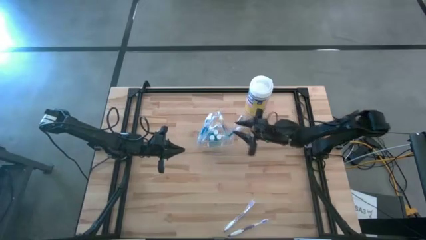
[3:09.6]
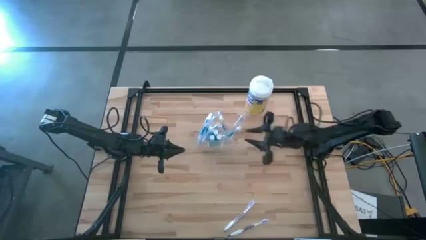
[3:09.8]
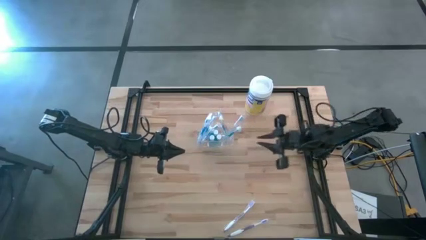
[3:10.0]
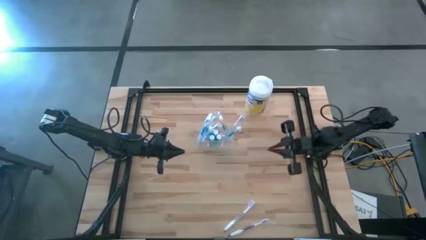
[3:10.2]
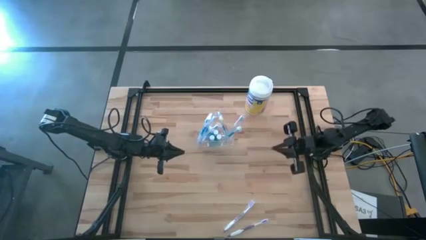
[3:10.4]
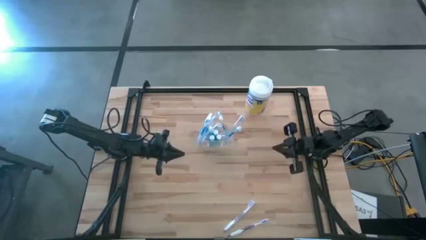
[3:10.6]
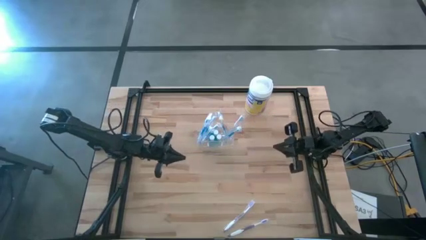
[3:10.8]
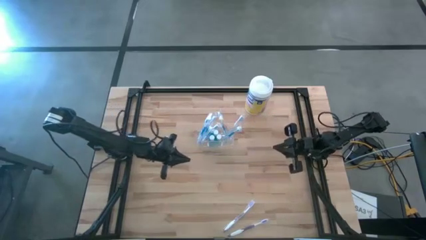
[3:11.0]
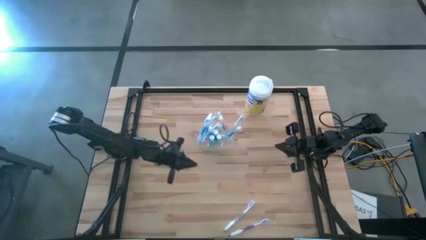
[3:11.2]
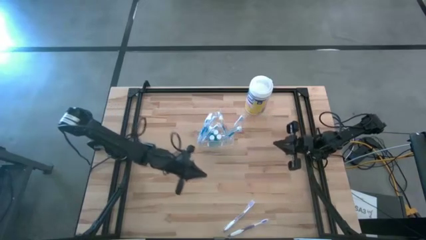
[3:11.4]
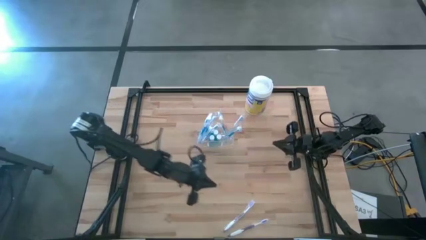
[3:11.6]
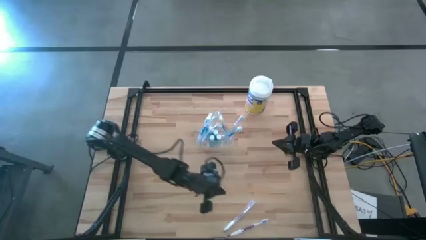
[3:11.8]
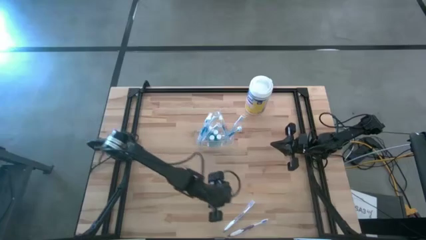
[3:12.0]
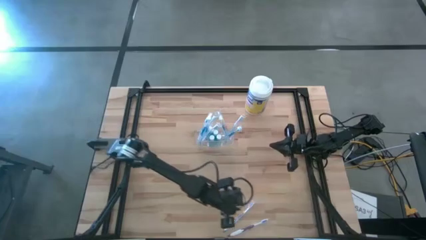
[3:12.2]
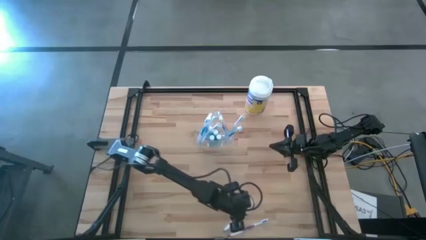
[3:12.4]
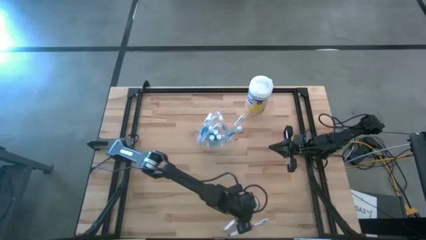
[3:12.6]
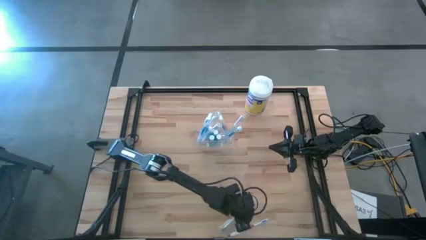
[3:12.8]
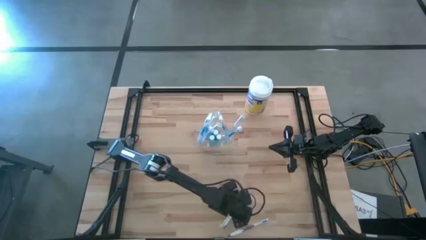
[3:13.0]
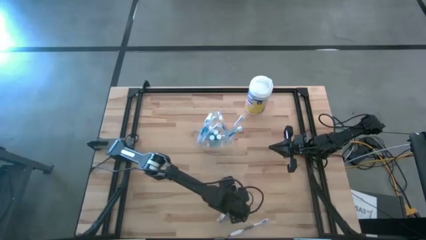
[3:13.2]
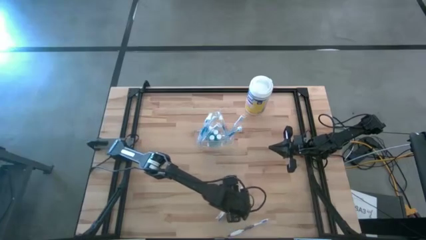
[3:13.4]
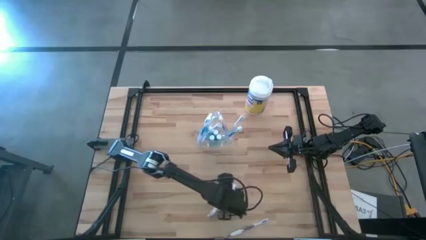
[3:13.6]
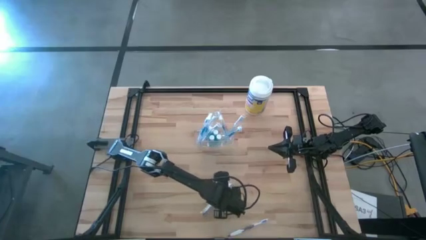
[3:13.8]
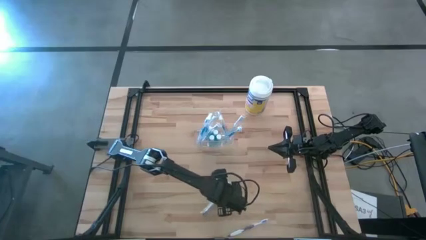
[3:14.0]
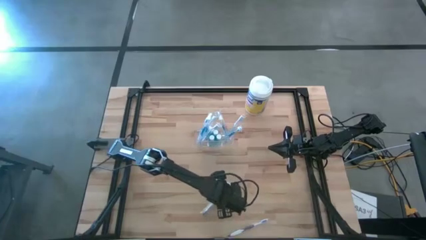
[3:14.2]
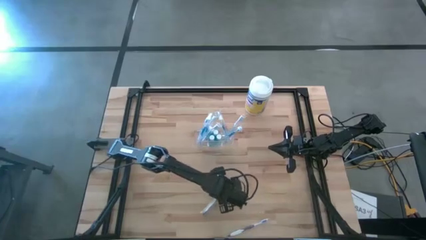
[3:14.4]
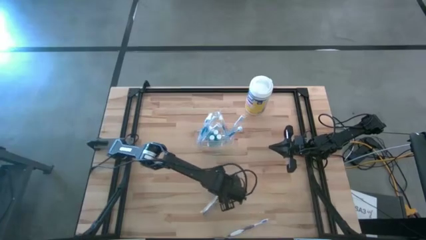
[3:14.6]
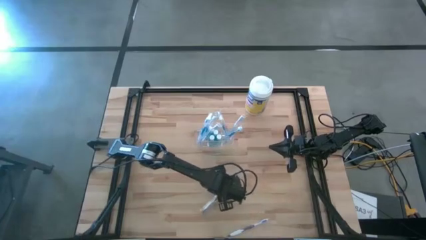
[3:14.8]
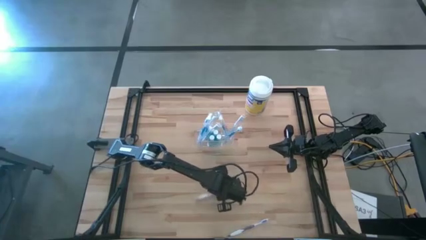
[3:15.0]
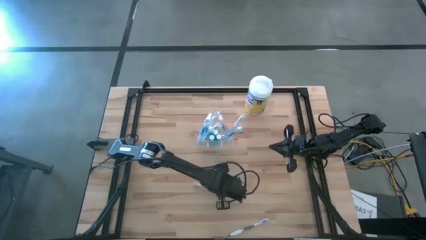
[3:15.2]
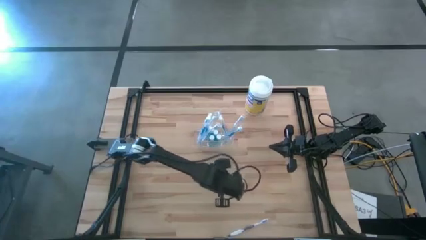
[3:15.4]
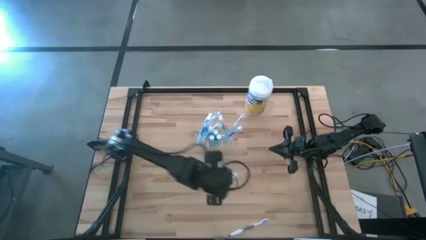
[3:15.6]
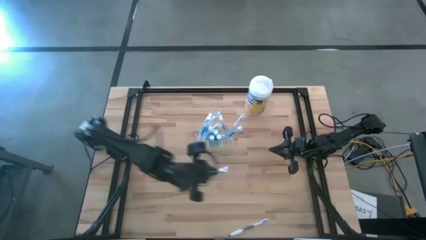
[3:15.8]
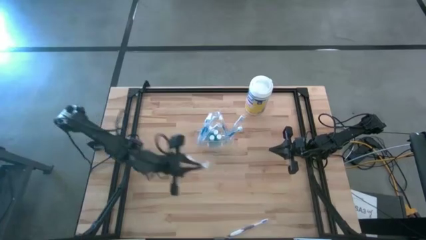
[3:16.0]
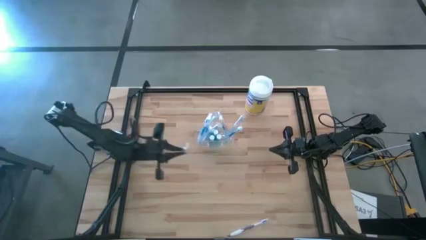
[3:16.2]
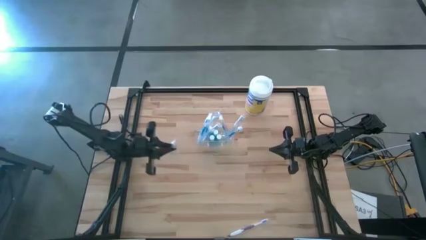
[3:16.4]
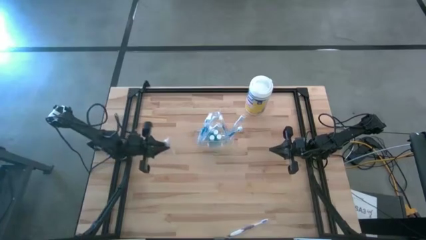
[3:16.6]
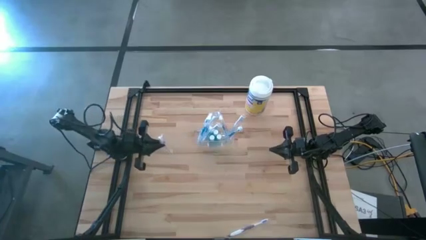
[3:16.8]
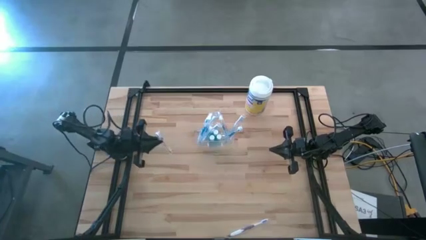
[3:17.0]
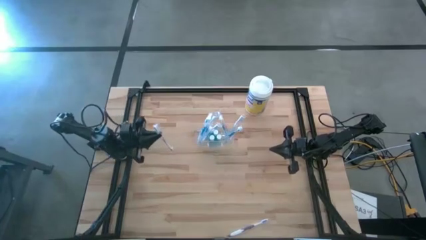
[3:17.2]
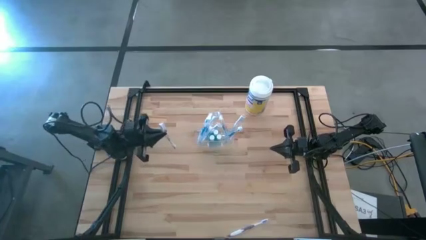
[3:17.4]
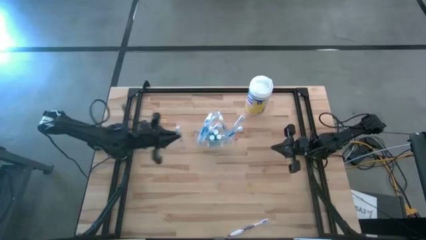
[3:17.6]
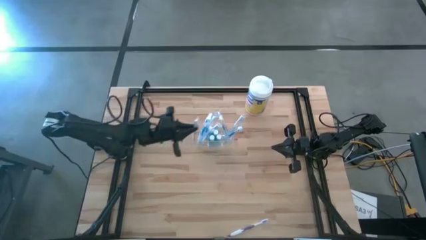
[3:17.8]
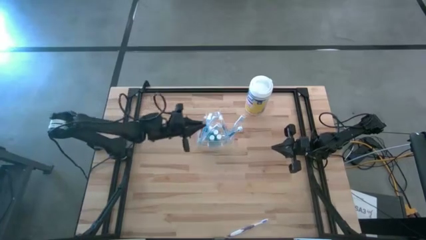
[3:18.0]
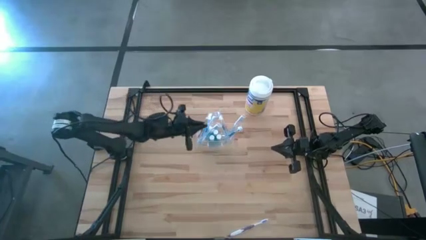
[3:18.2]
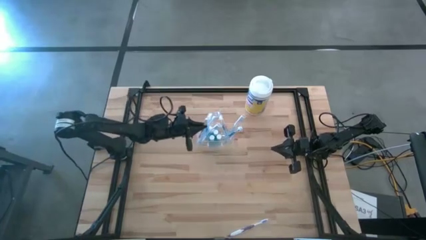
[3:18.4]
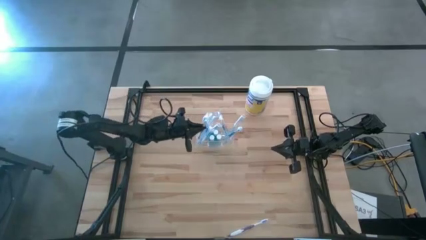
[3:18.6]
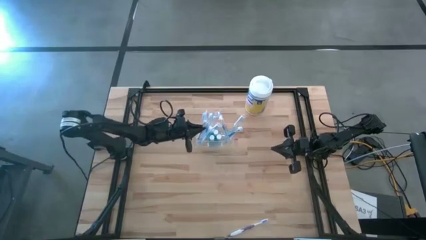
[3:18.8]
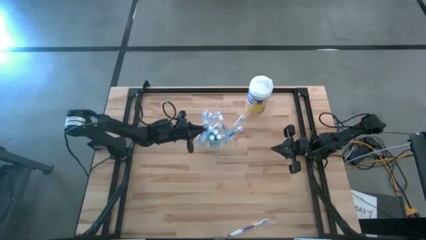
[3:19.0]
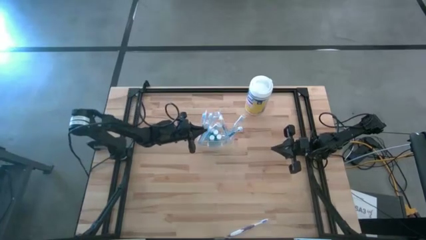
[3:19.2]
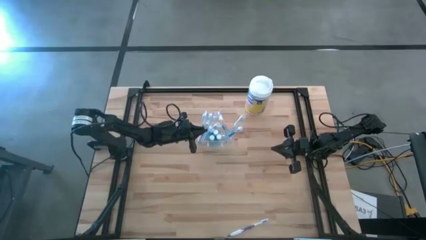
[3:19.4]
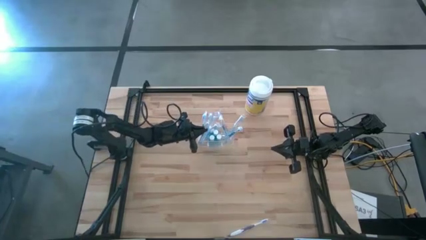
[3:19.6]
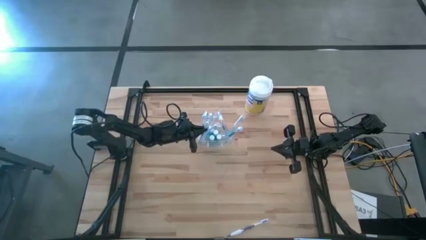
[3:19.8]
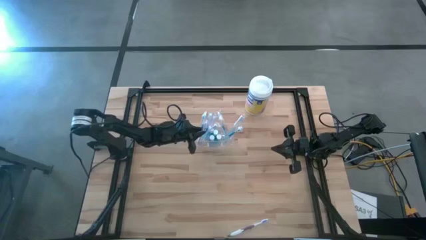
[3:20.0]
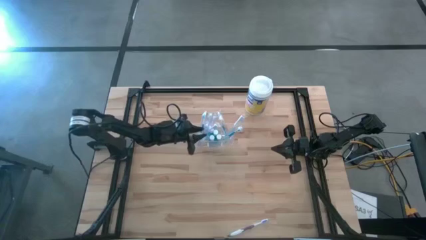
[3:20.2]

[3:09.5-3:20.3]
Task: Pick & Place toothbrushing station
Put the violet toothbrush into the transparent organizer
